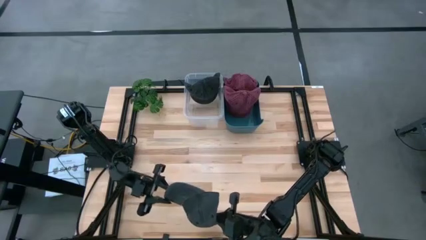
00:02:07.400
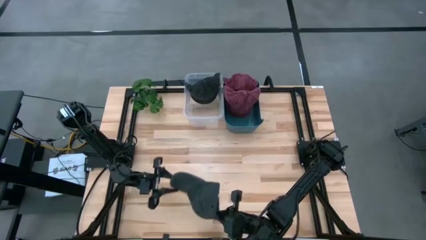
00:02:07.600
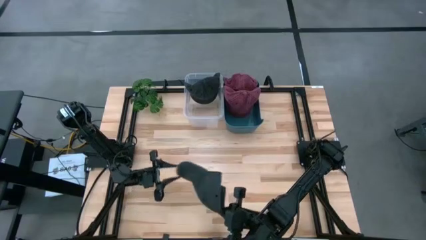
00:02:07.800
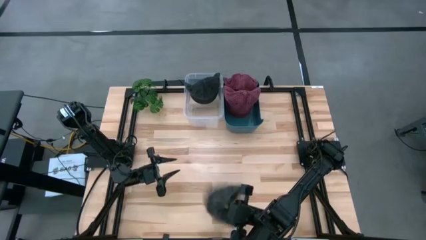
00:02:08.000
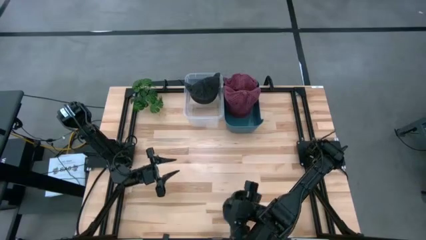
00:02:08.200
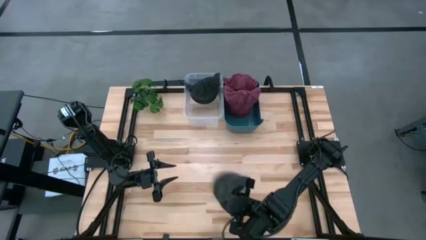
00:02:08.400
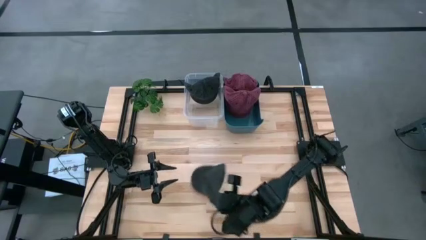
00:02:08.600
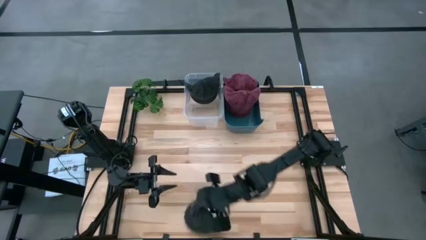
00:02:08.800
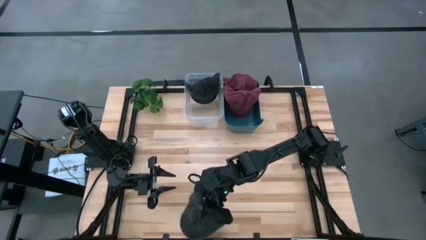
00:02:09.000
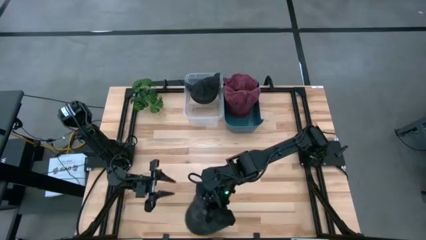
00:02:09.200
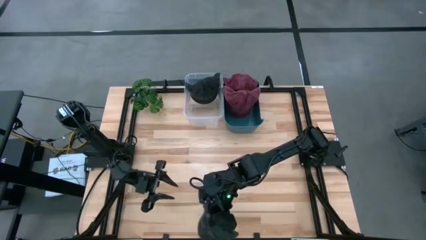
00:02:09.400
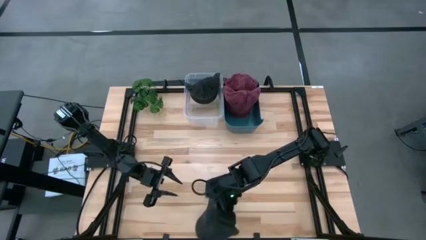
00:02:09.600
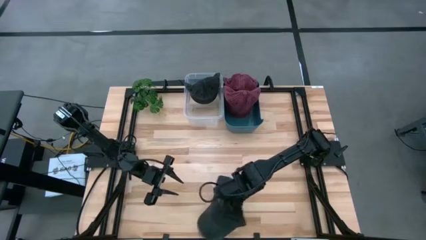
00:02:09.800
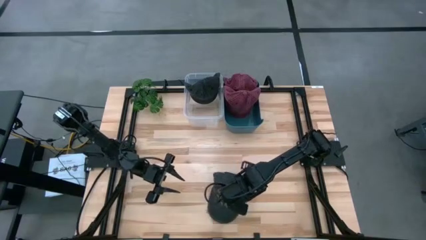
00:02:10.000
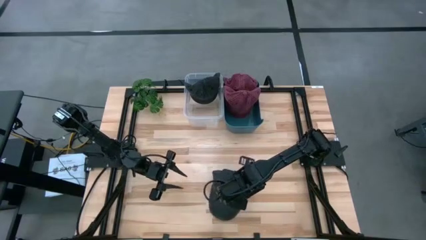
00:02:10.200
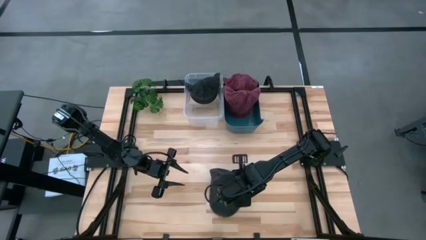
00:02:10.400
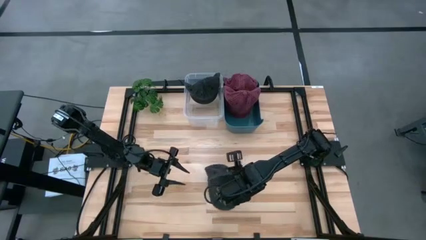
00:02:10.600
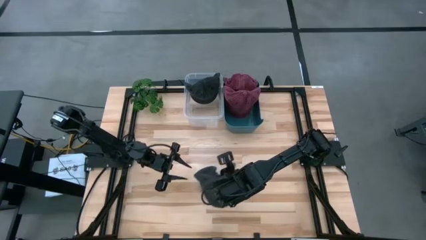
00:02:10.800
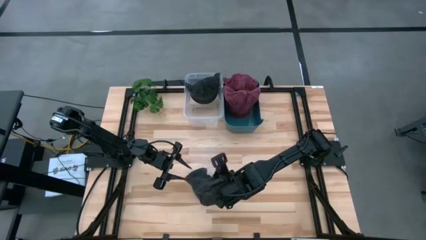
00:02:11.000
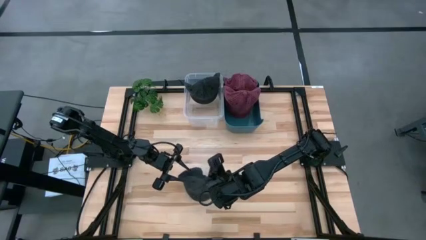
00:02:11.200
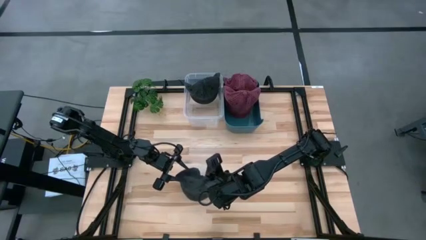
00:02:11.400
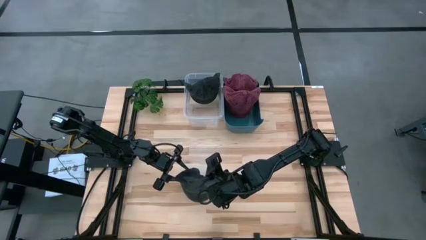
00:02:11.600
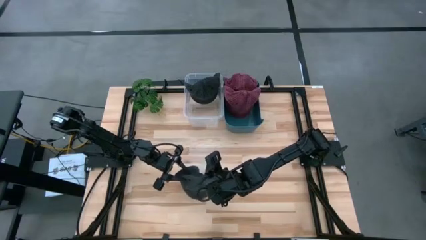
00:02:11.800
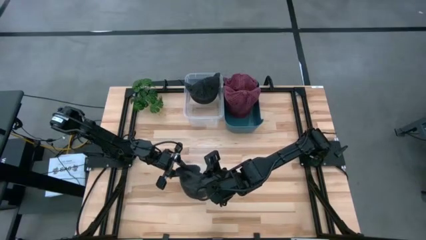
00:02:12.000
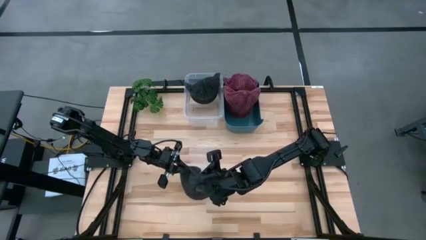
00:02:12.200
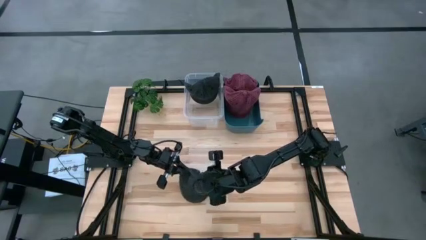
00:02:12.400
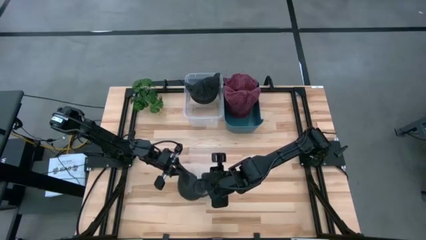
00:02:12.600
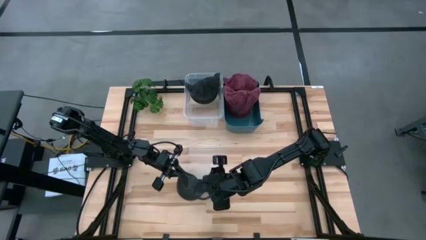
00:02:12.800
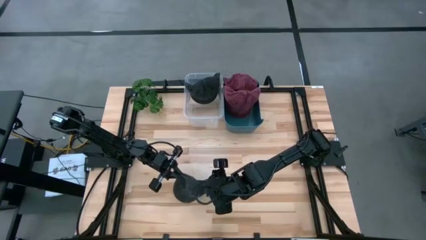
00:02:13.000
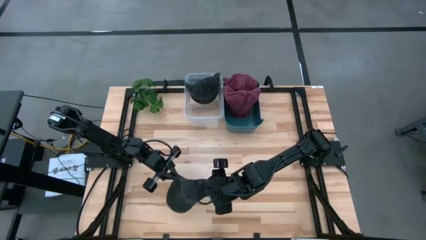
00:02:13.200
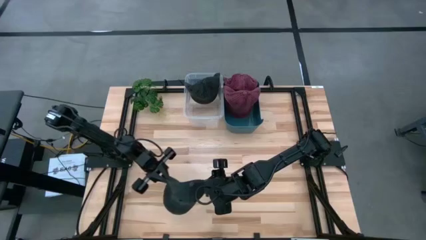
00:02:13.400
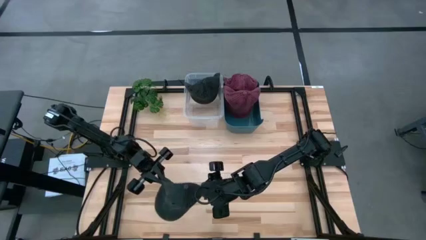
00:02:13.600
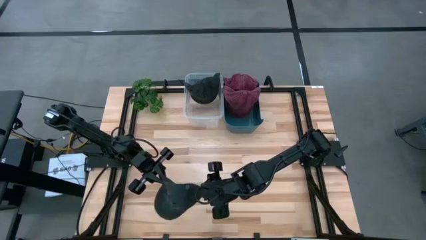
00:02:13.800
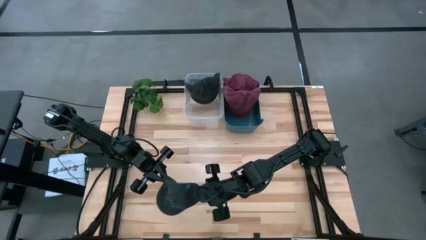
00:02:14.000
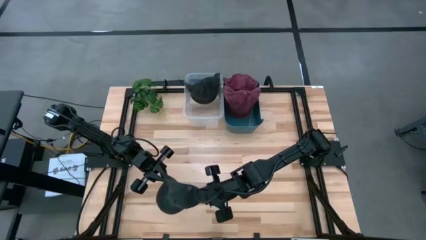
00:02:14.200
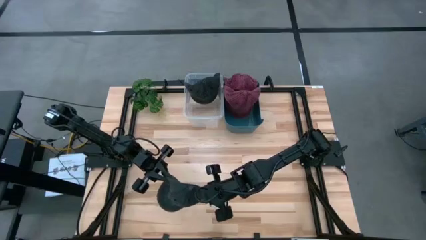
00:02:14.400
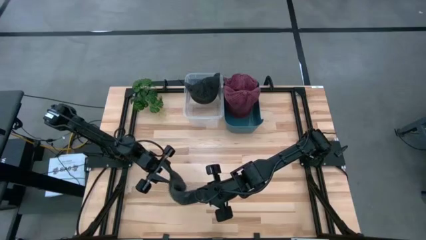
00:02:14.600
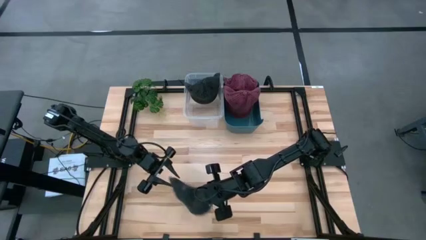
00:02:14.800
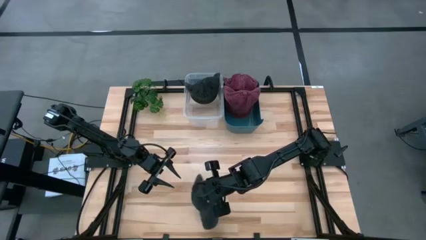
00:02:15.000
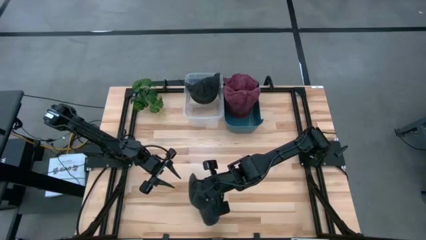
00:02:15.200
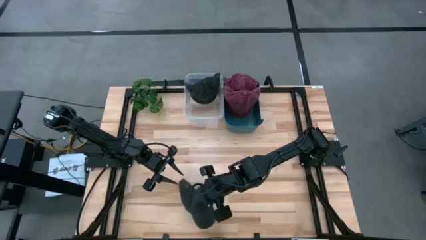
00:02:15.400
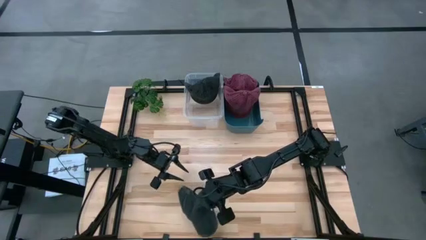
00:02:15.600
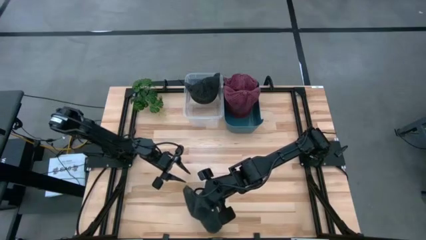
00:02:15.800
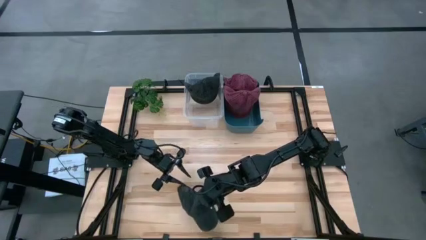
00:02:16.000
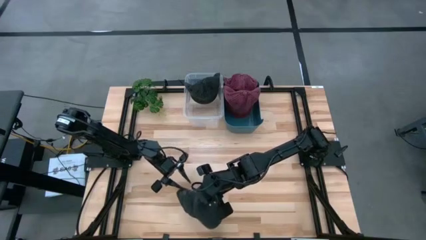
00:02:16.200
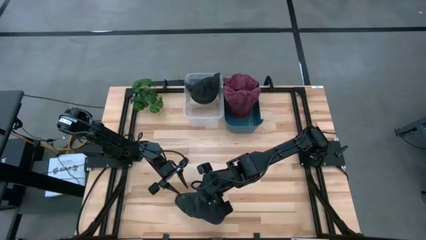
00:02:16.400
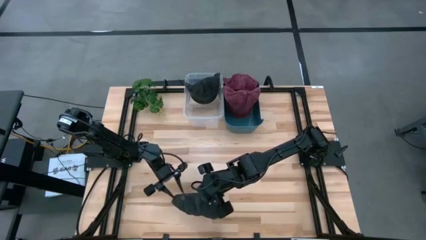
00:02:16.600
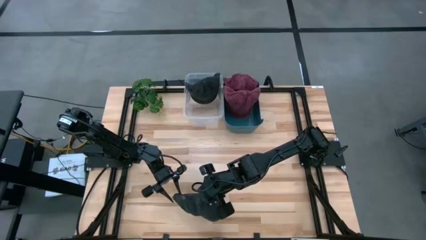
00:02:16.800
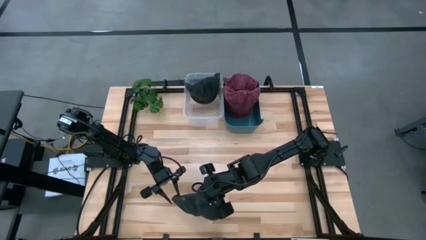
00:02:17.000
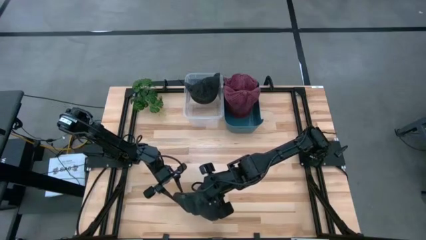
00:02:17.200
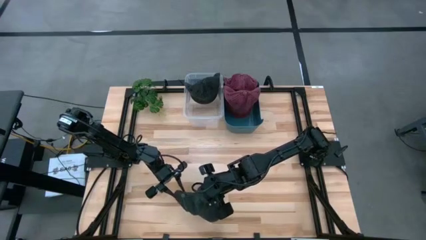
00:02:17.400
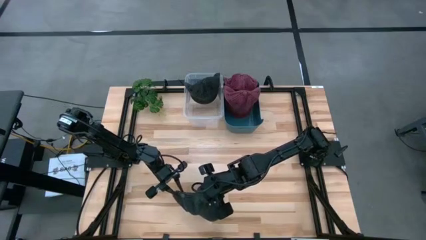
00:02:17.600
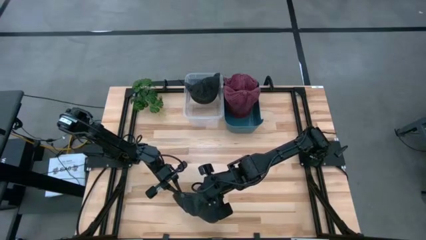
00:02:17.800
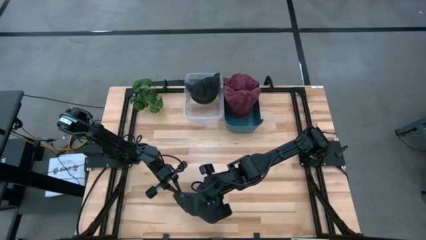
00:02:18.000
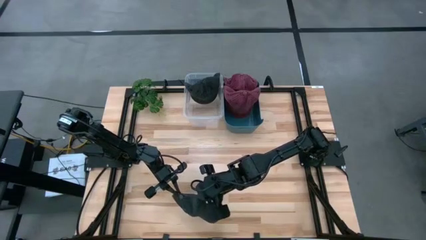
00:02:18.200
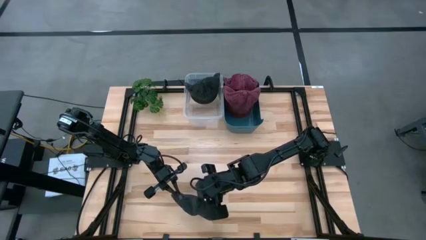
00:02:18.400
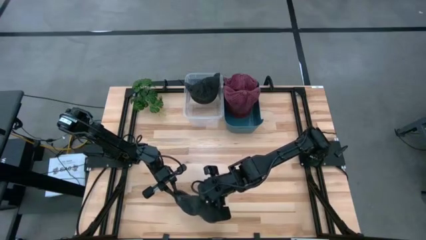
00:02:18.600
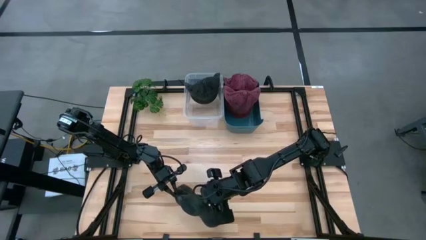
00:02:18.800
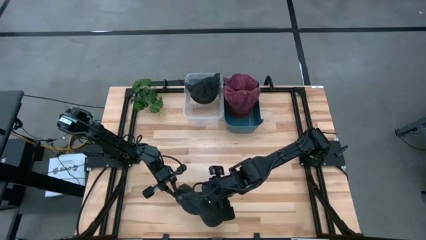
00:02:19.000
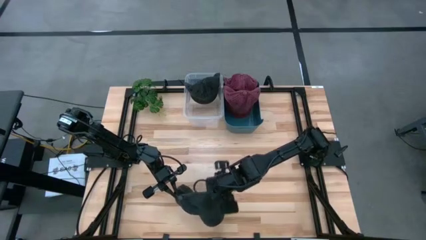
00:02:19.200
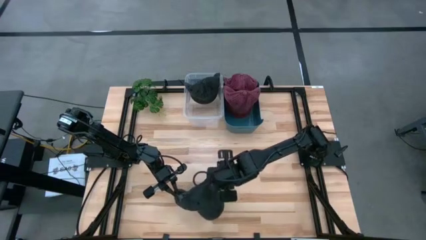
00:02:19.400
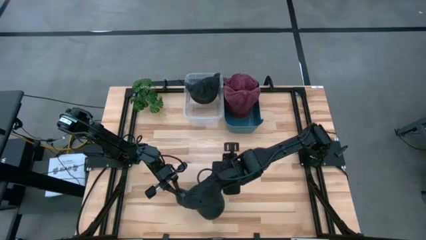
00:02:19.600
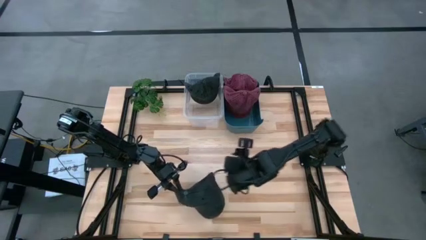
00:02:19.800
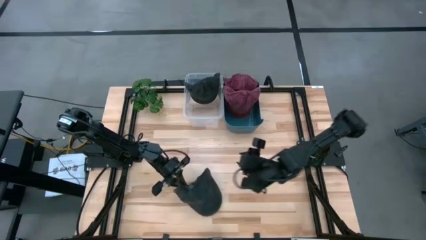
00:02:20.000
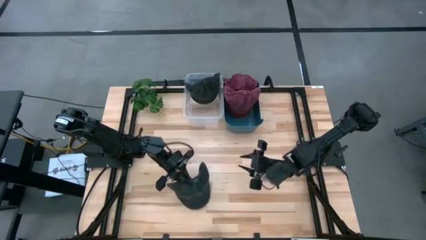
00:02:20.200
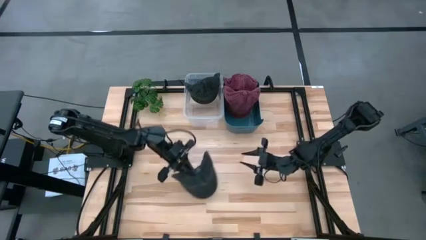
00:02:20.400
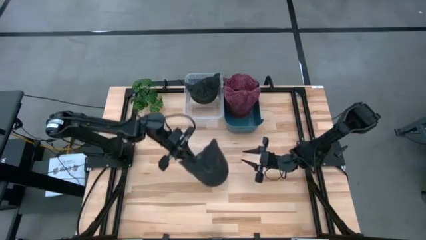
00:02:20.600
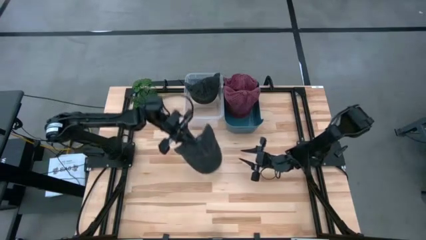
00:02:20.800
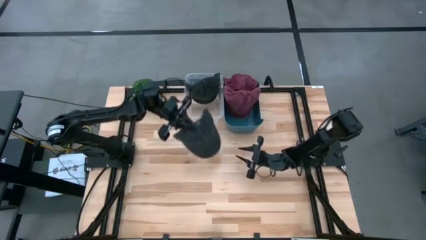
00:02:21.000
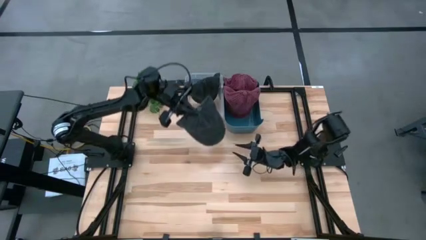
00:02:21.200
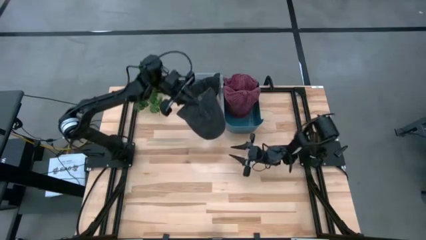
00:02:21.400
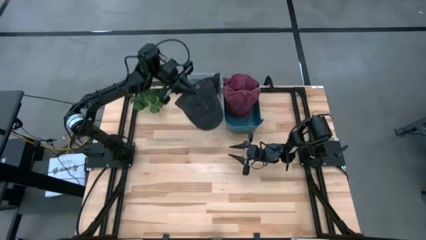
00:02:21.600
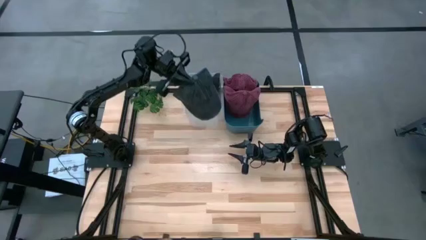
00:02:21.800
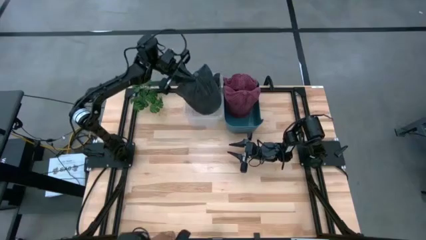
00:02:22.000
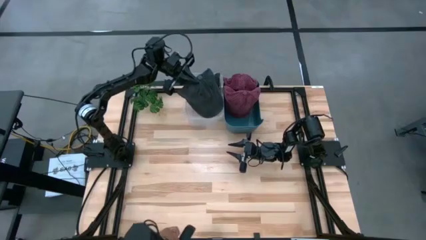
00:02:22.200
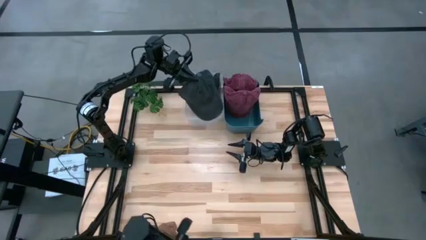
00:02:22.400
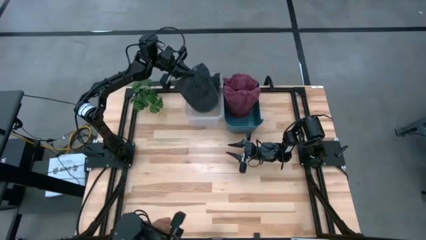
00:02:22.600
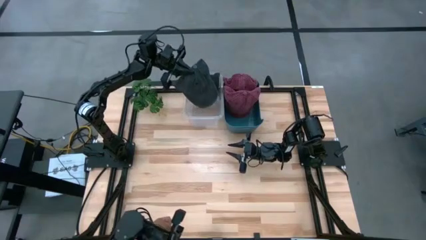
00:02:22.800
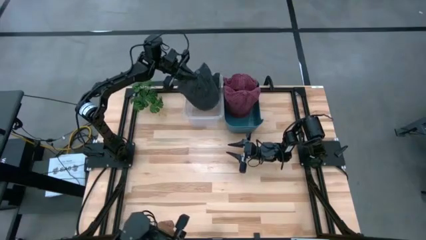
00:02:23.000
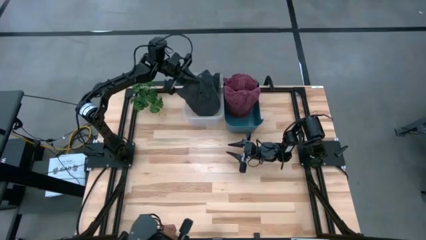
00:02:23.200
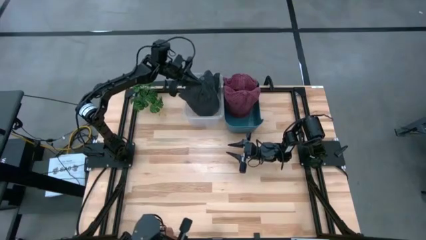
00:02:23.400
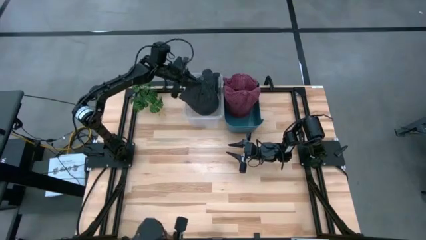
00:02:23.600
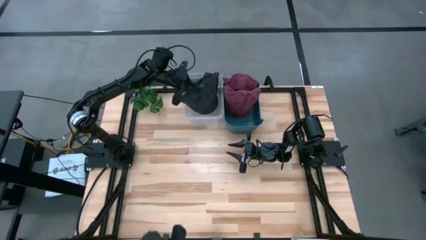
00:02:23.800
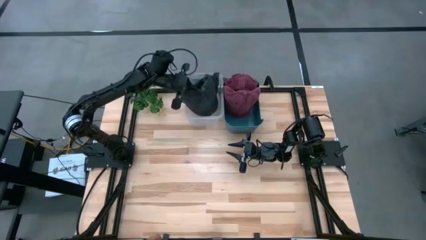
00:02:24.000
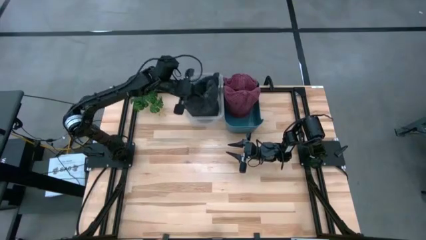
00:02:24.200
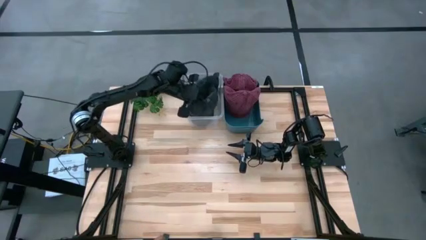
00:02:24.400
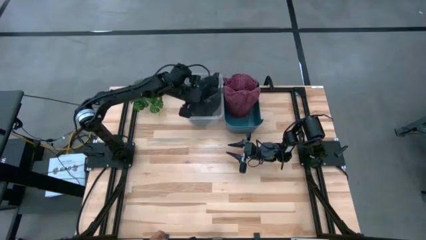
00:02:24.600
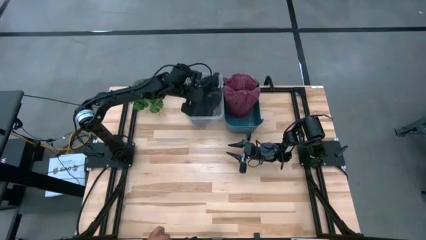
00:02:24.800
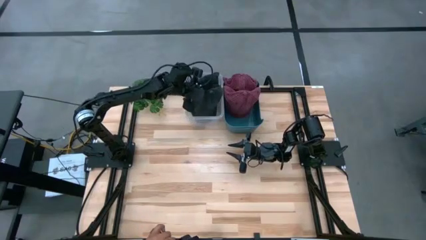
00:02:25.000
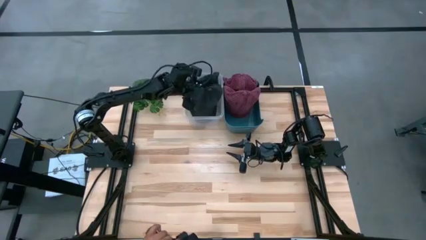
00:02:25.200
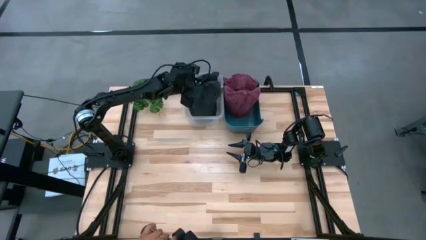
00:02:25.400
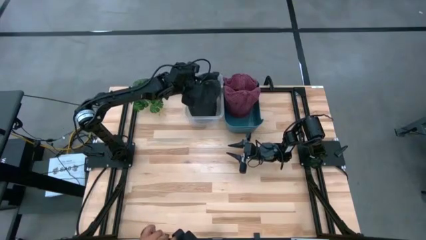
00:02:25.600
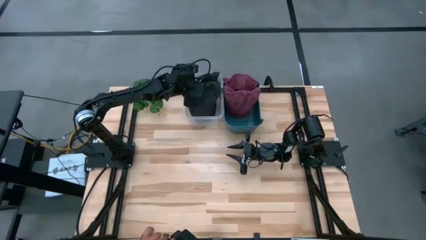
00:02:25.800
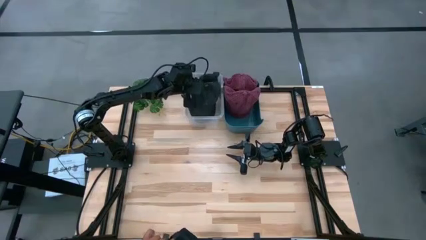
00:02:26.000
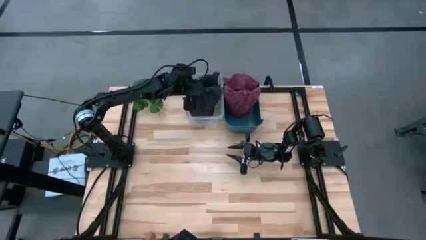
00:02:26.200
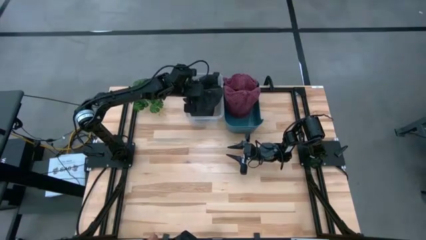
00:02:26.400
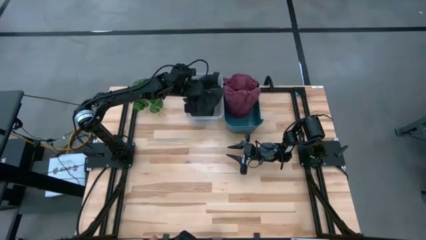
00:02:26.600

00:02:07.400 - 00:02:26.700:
Task: Pick & Place hat
Put the black cap into the transparent bin
